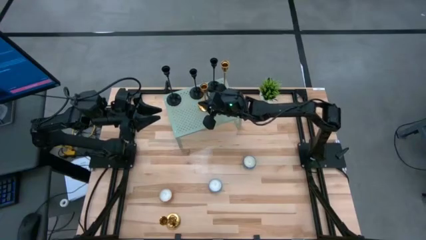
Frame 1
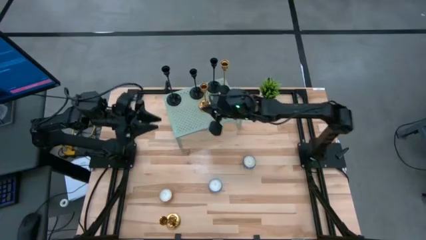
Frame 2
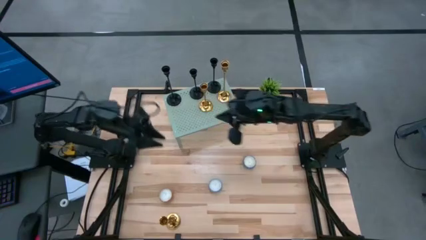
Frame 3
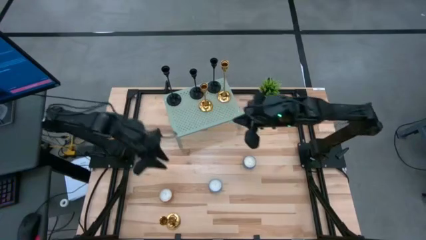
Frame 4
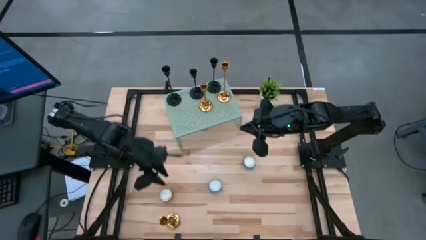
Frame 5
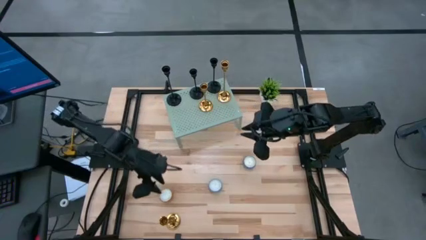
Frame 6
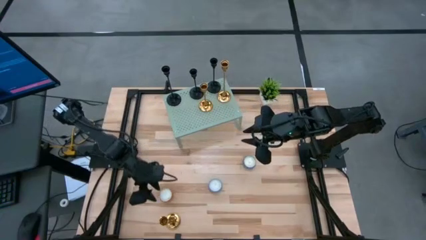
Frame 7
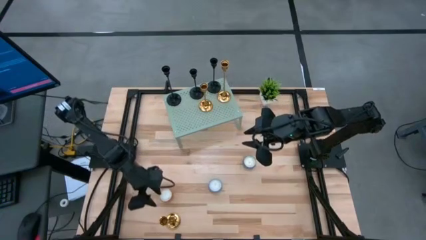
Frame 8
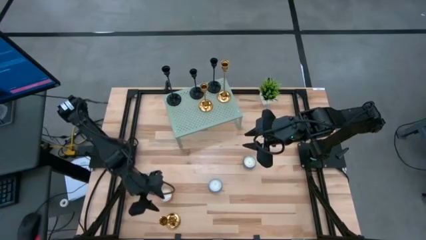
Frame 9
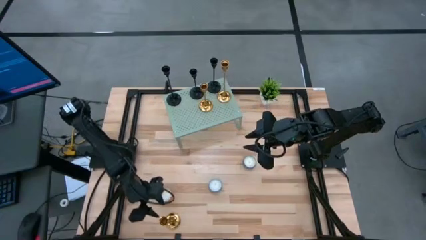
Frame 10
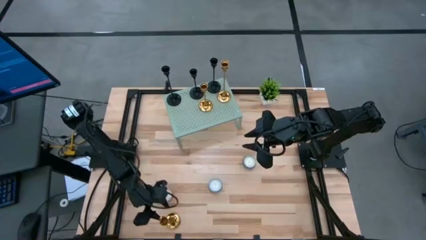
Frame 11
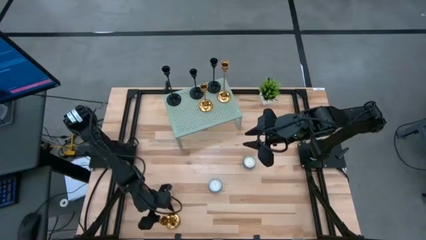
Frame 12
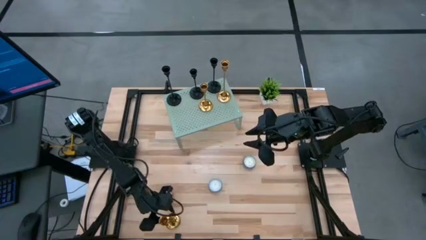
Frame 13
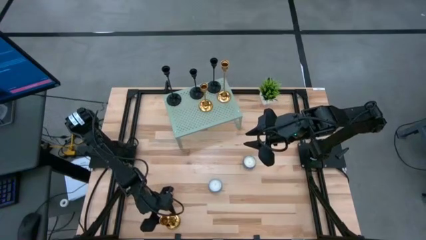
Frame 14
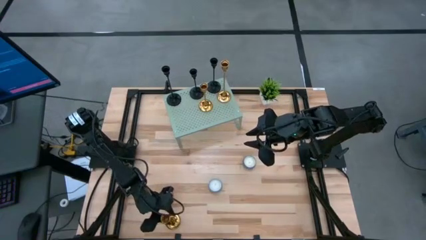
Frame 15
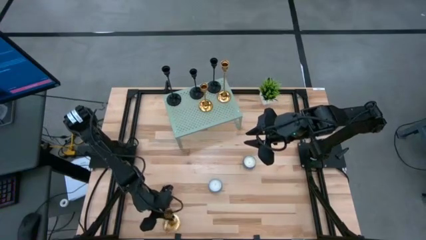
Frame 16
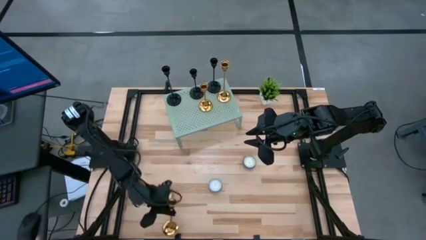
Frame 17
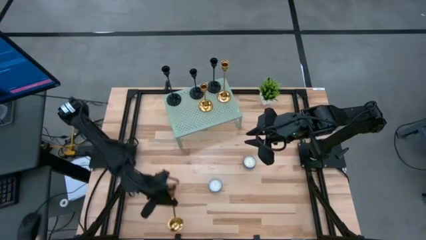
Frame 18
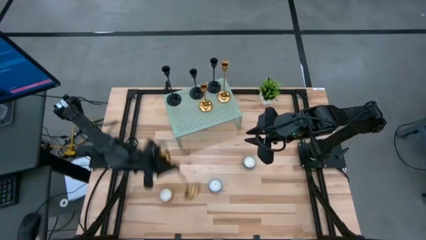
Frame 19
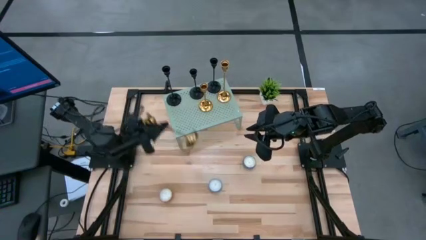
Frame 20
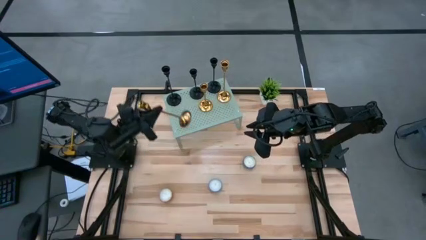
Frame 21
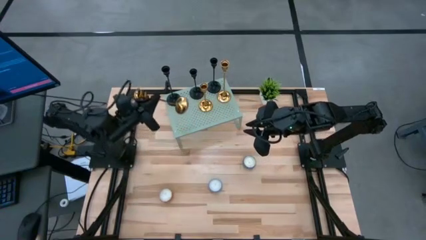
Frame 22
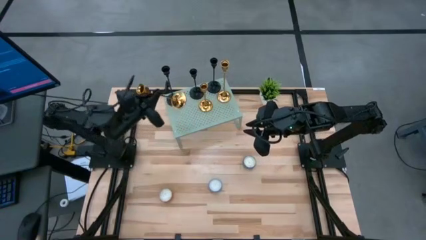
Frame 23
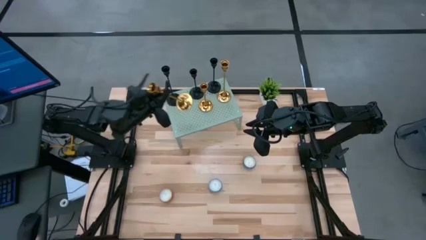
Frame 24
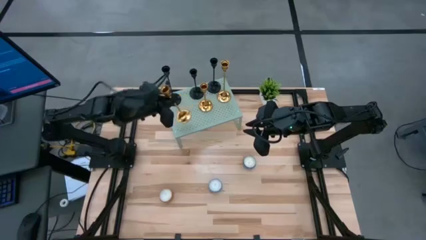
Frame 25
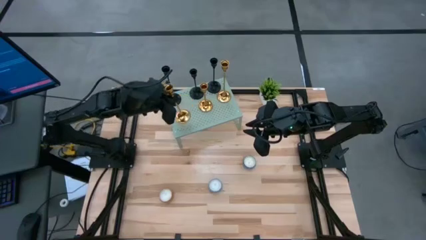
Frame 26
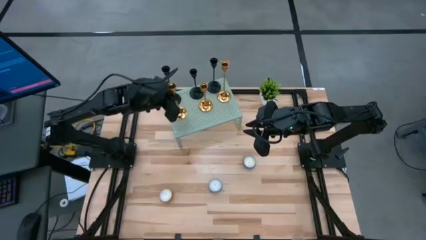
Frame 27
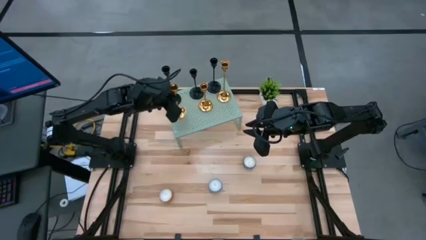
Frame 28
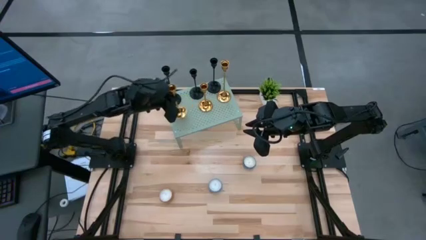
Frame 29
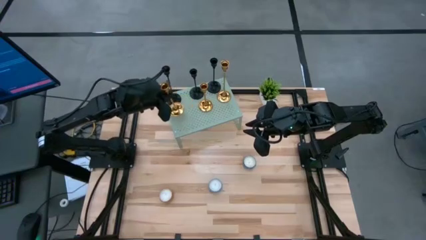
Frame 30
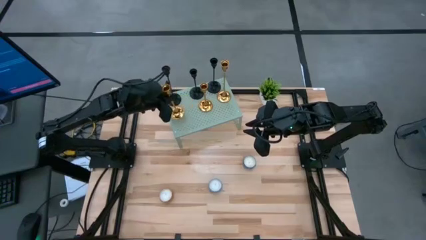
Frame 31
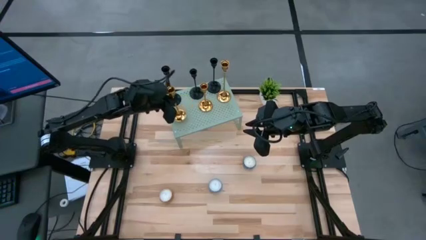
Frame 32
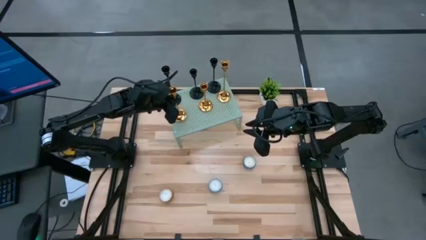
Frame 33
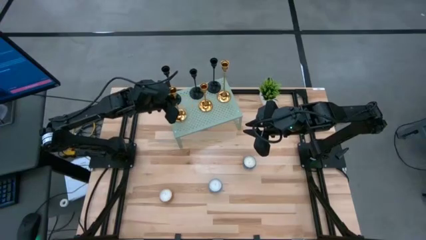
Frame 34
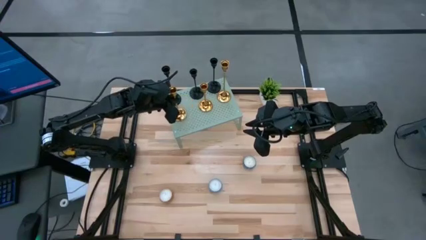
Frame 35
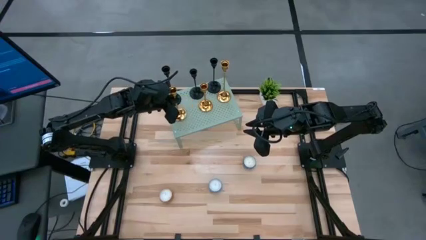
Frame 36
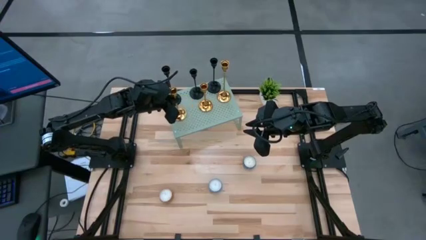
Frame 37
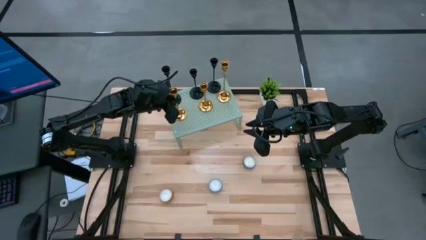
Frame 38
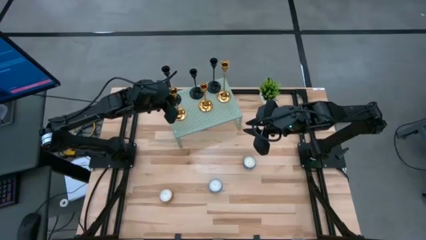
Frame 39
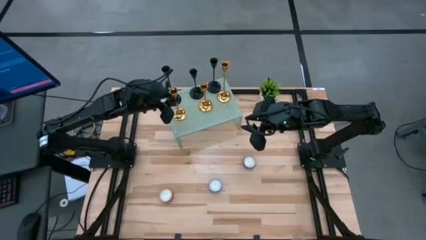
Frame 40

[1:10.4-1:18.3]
Task: Pick & Place candle stick holders
Put the gold candle holder on the shelf aligned with the other gold candle holders

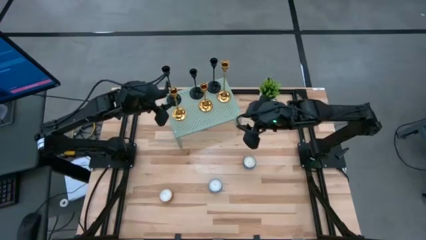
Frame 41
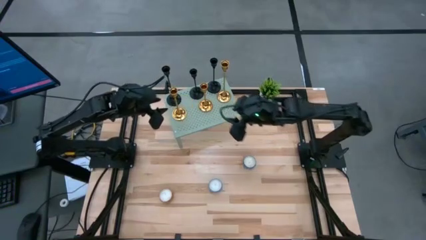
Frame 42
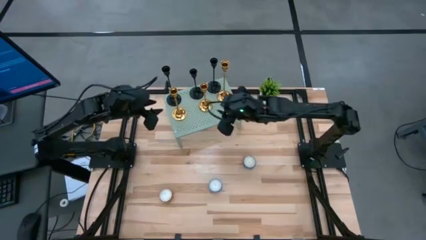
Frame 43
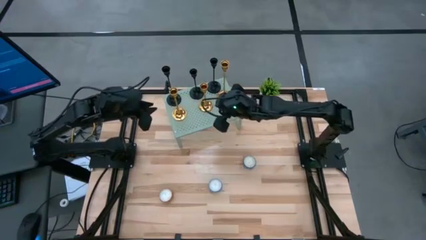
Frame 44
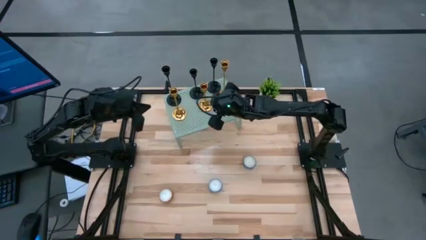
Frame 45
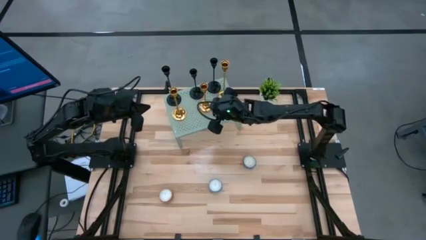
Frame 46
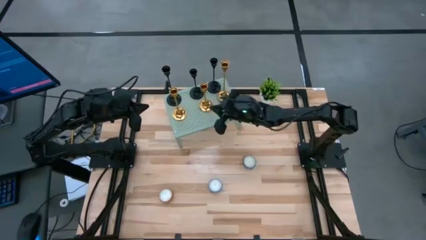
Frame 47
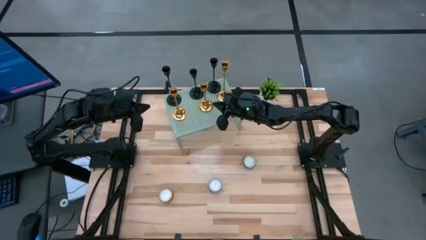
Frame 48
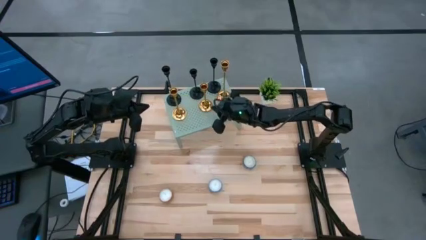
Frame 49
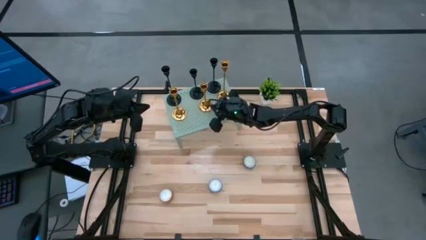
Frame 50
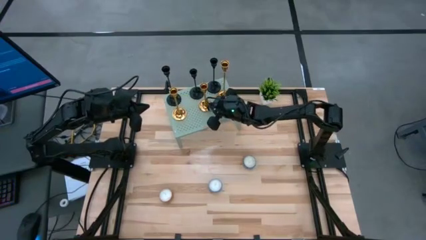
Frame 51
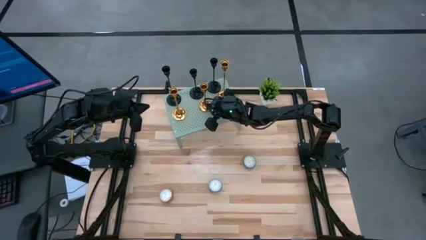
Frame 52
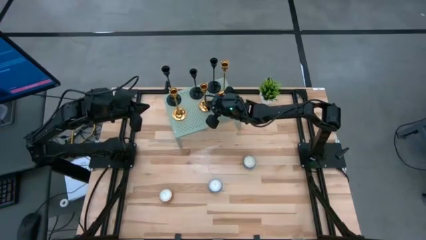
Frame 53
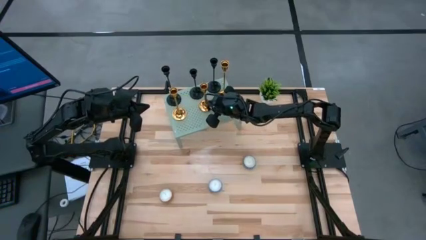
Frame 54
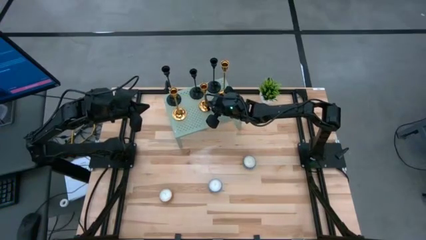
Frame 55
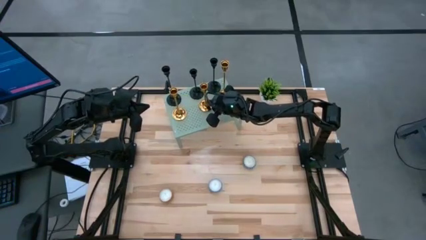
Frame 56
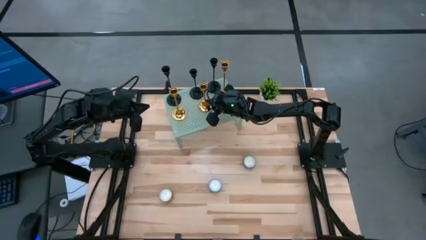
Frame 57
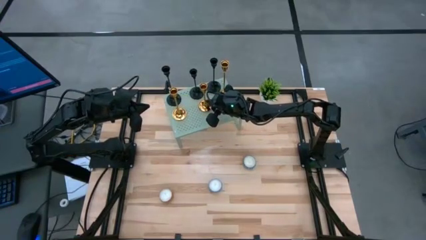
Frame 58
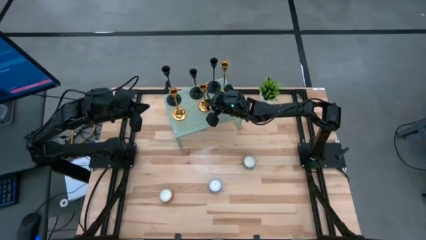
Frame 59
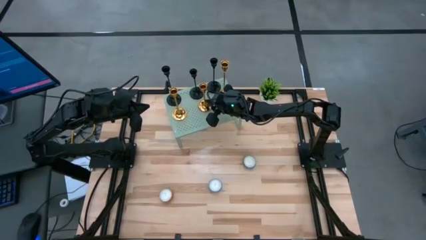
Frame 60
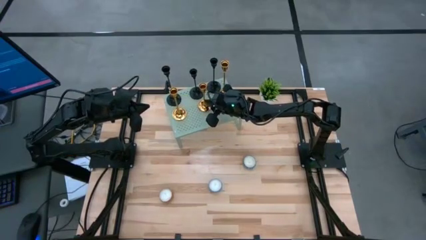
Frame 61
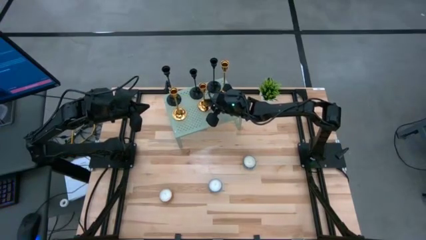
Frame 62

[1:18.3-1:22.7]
Adjust the gold candle stand on the shelf

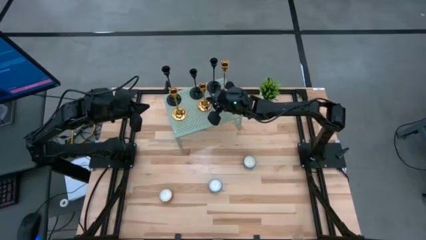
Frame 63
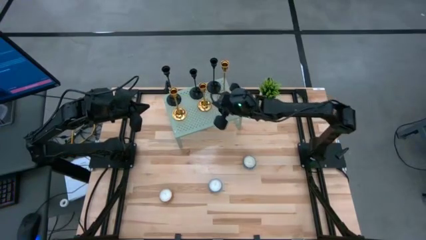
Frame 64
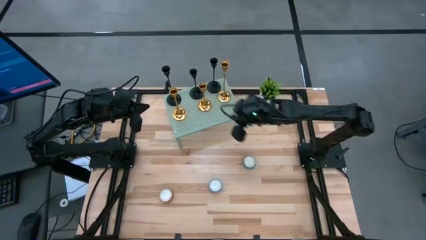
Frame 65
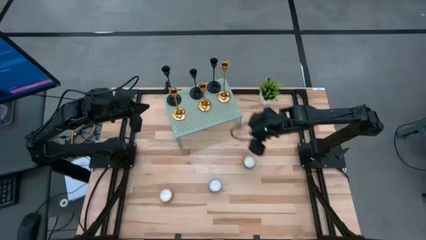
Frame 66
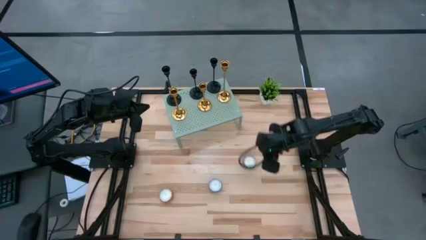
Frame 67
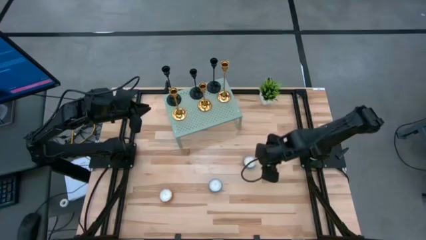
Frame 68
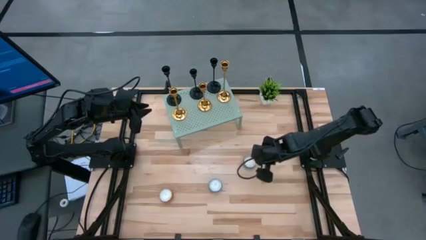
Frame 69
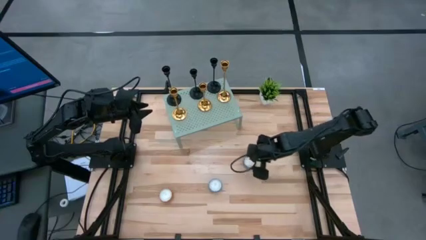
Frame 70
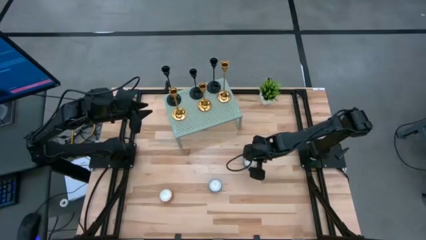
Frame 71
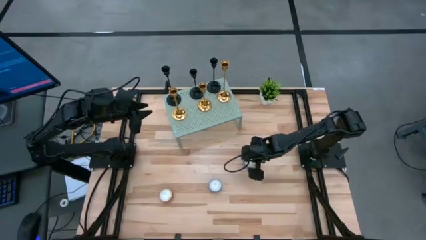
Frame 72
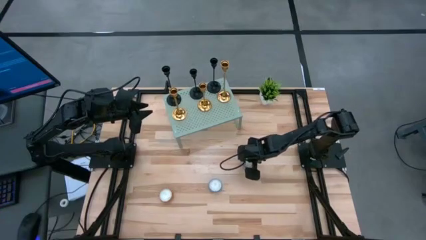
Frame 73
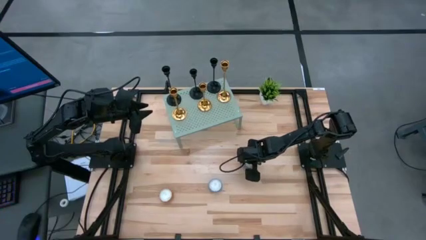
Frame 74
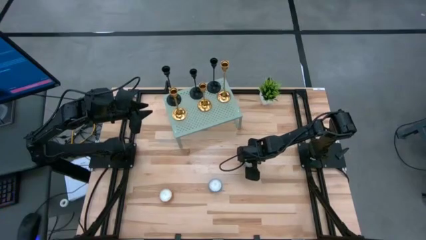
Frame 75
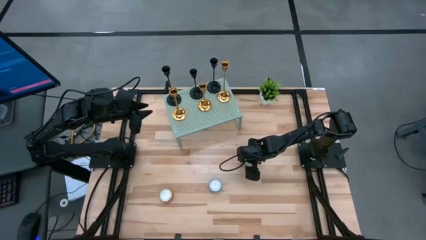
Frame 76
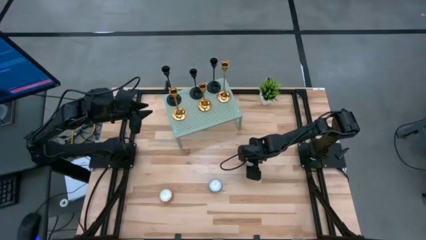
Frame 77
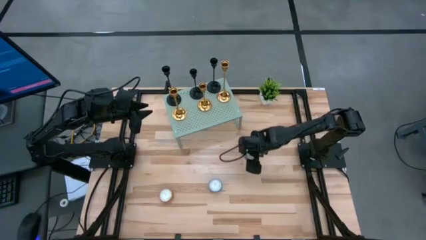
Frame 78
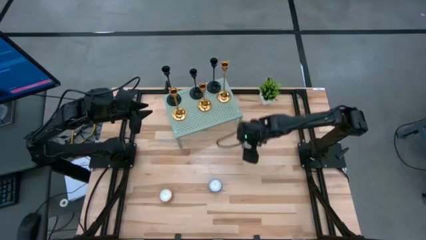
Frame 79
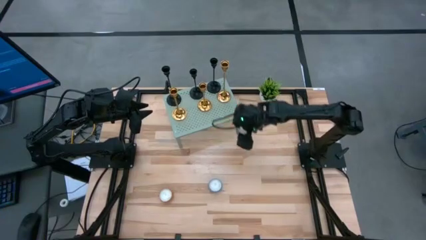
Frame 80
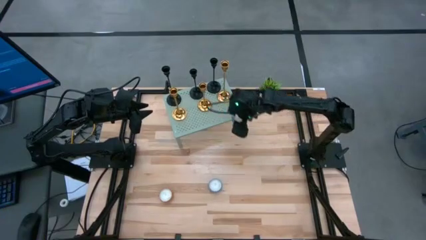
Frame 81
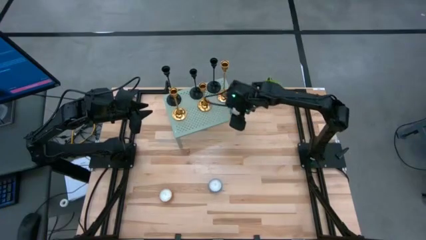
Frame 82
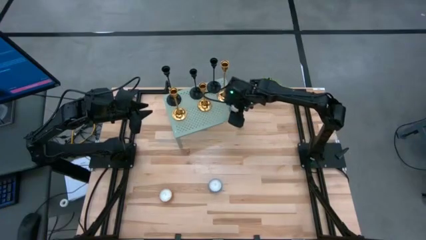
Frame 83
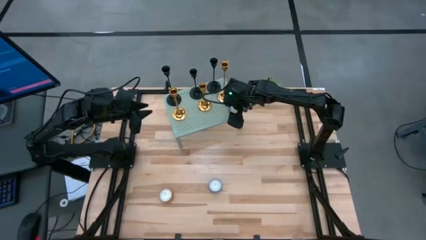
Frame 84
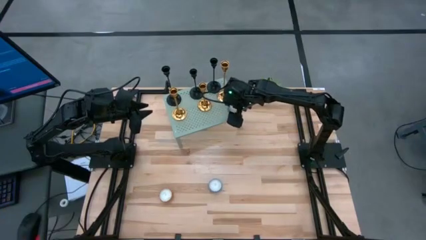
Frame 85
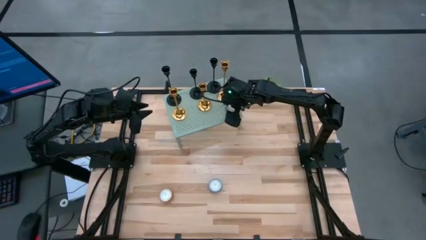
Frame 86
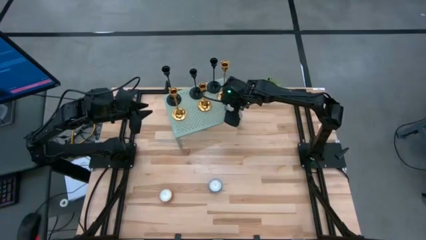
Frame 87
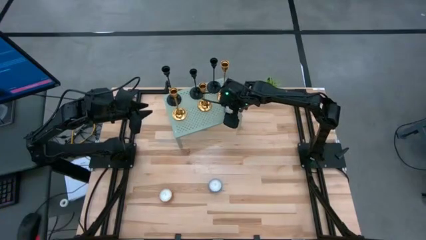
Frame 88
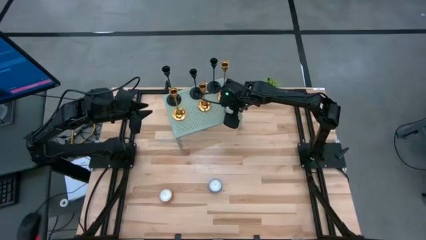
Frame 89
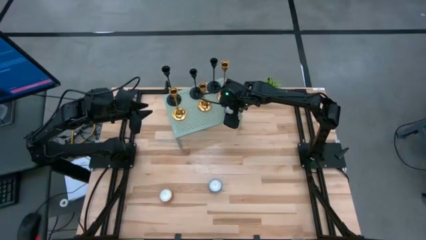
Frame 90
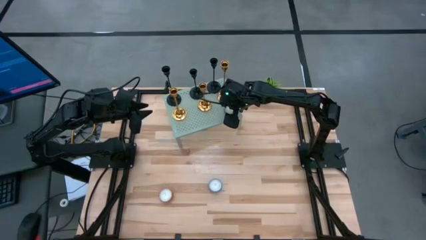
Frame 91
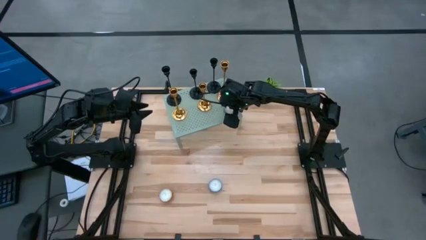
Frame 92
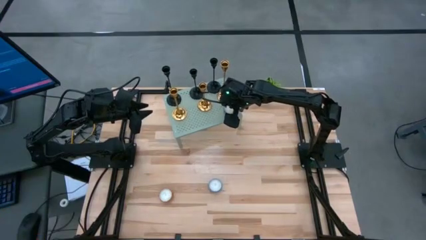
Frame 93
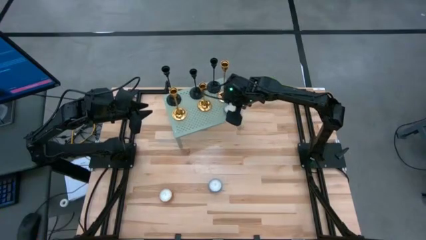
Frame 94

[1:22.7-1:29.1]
Put the right blue scented candle on the shelf
